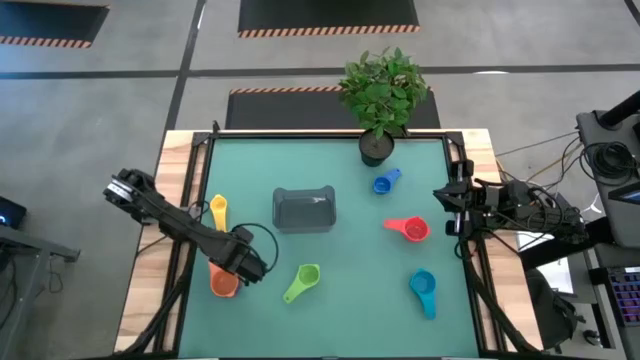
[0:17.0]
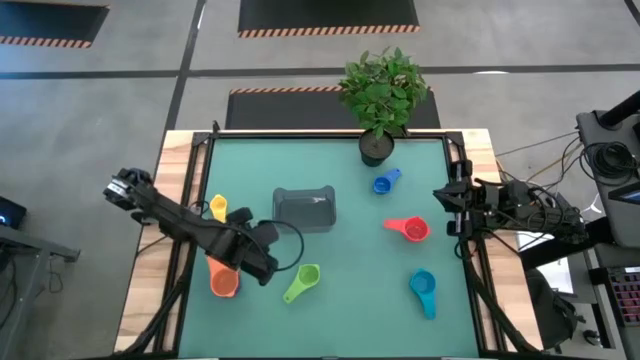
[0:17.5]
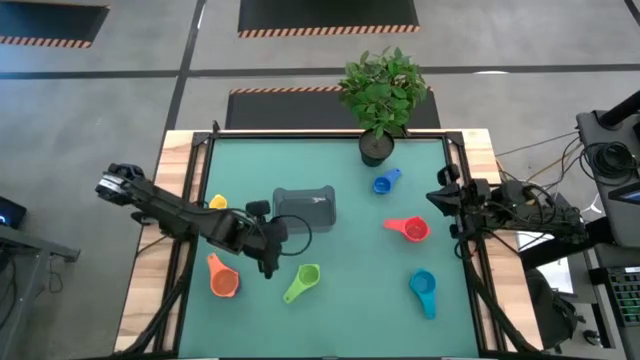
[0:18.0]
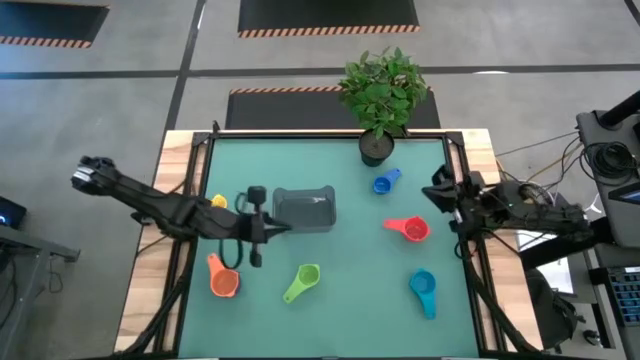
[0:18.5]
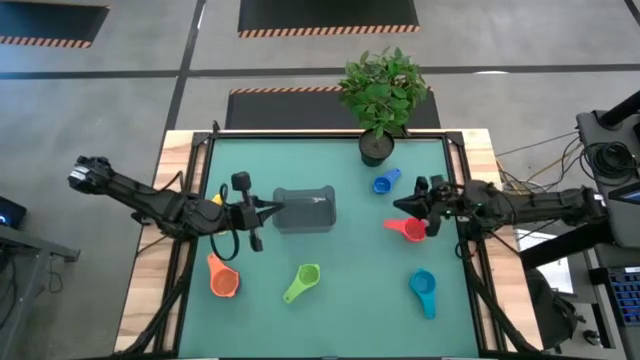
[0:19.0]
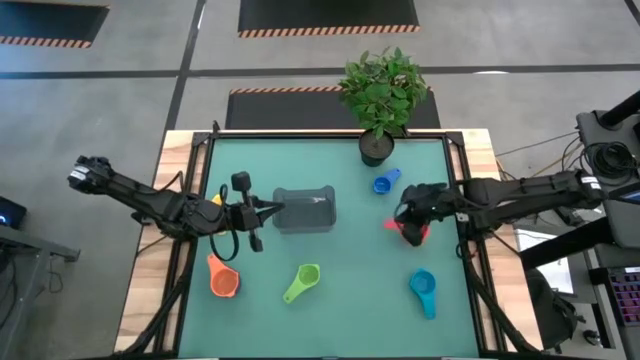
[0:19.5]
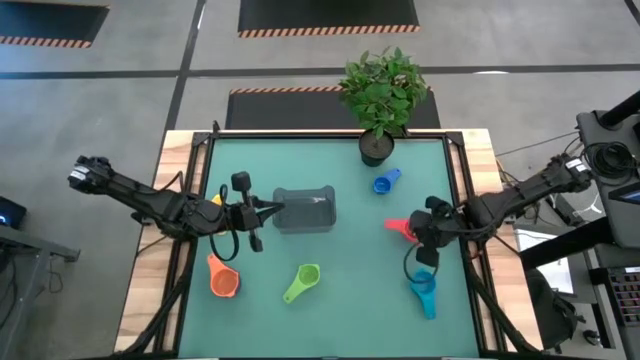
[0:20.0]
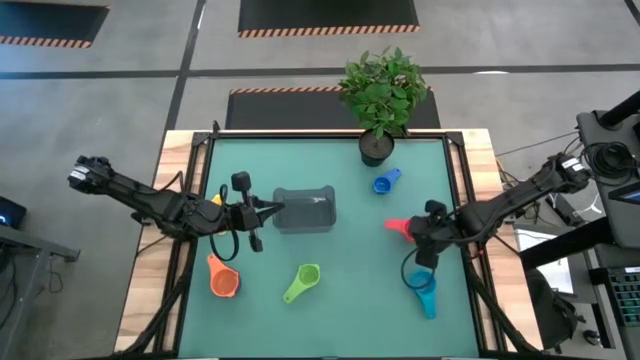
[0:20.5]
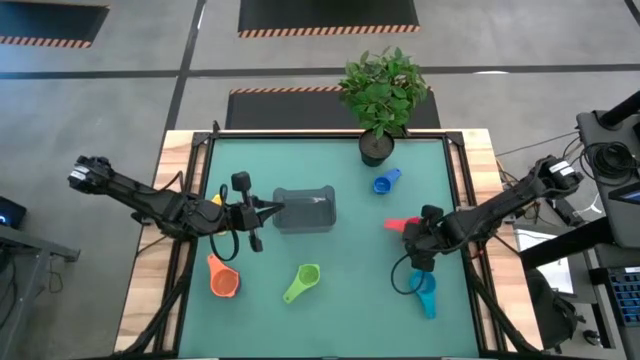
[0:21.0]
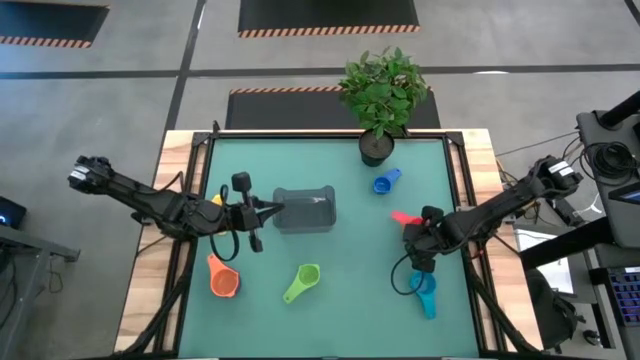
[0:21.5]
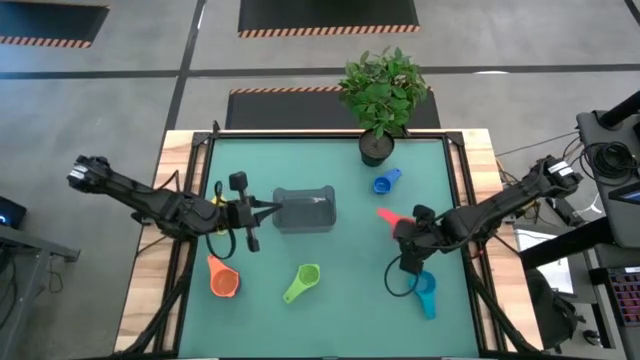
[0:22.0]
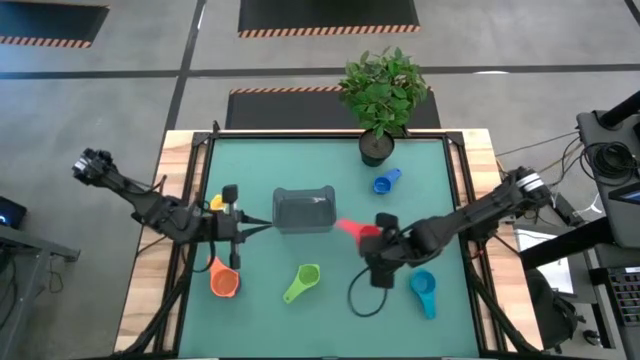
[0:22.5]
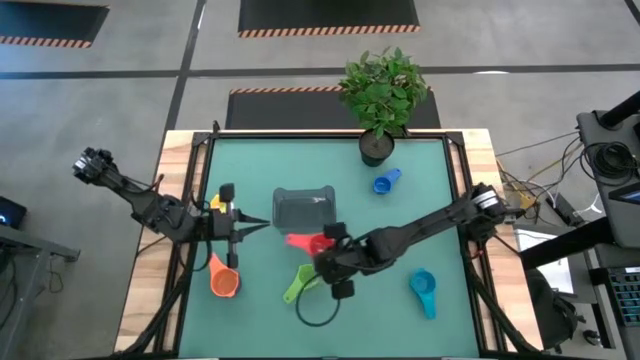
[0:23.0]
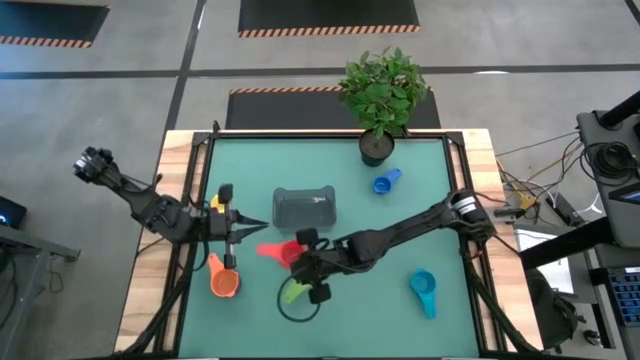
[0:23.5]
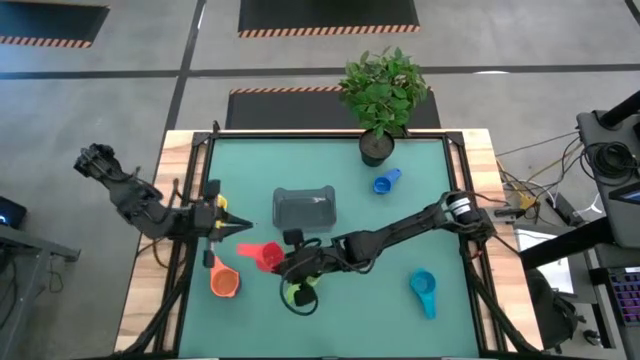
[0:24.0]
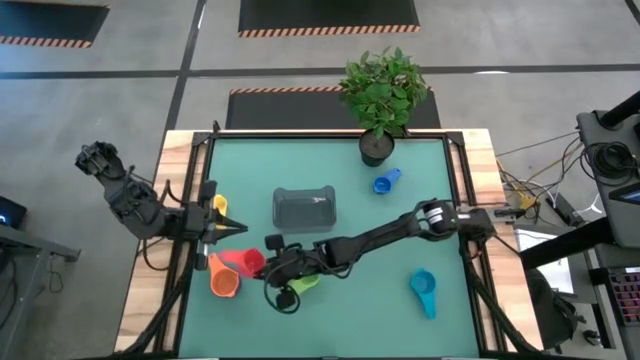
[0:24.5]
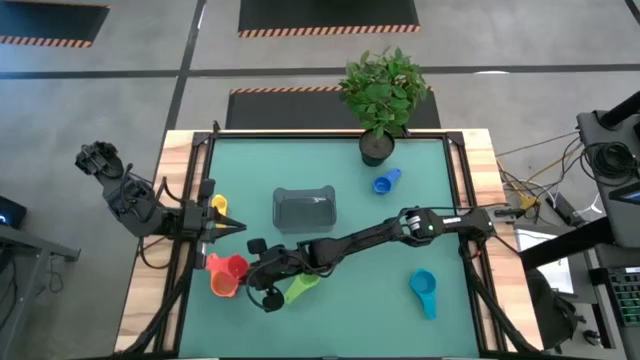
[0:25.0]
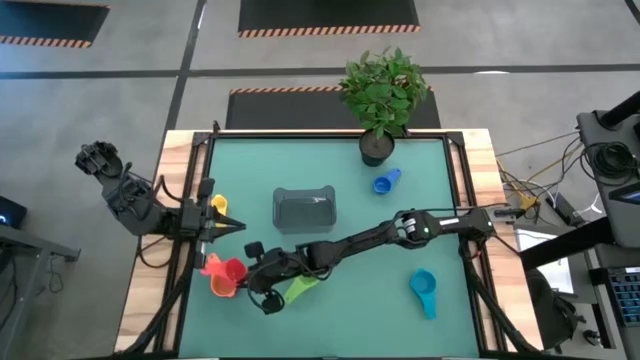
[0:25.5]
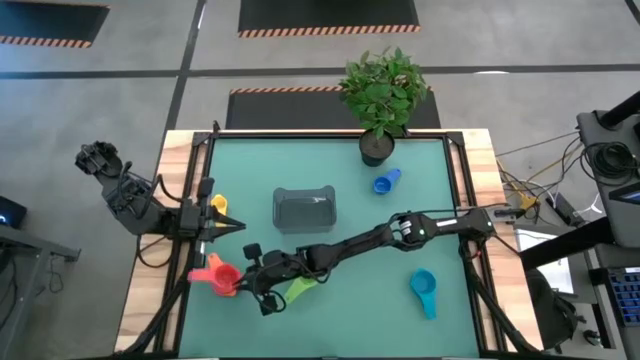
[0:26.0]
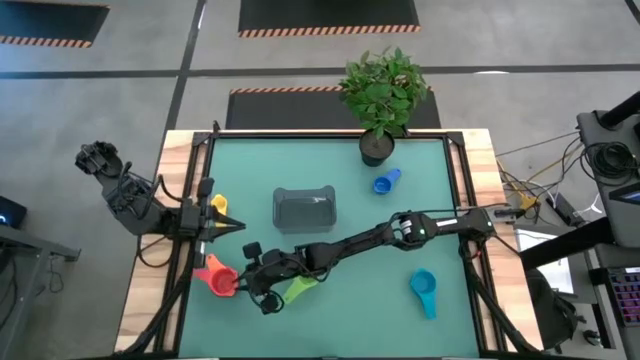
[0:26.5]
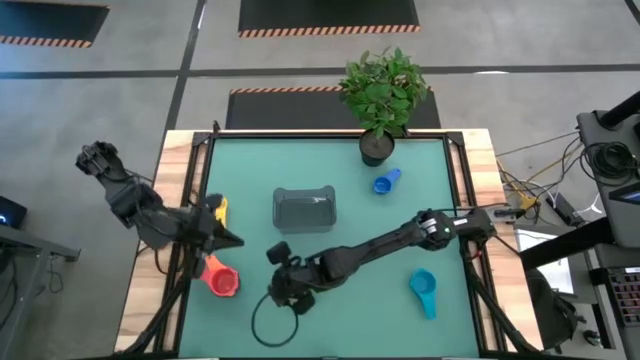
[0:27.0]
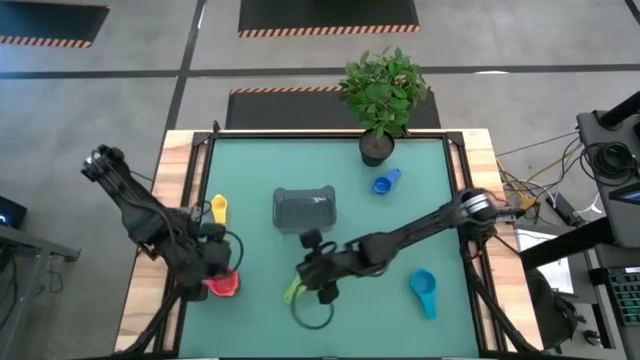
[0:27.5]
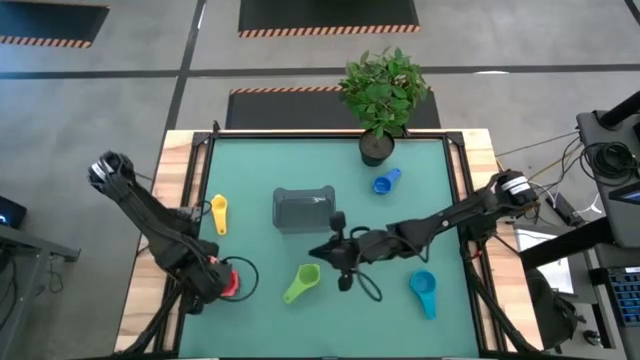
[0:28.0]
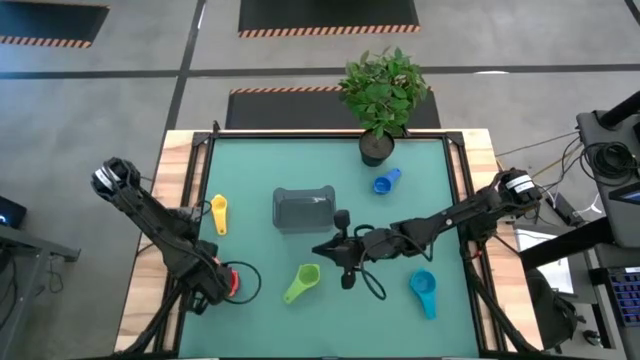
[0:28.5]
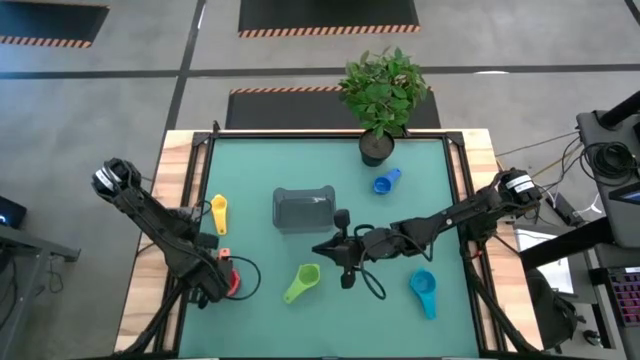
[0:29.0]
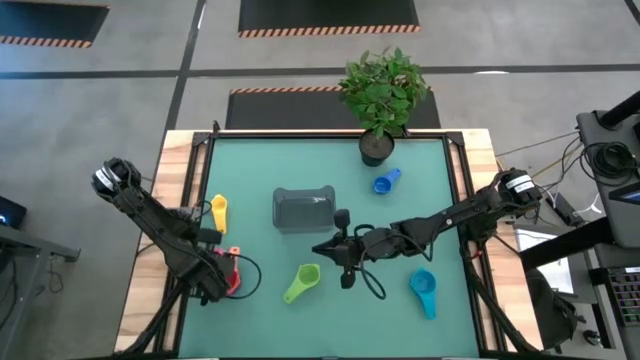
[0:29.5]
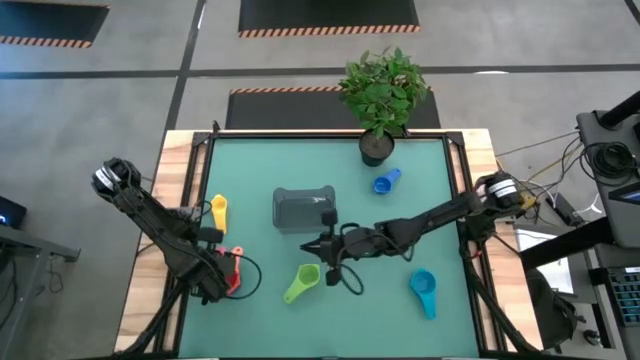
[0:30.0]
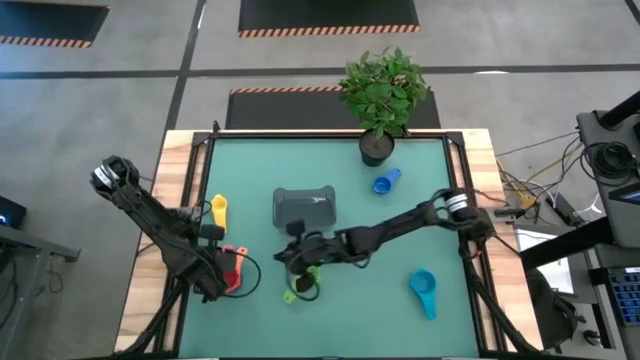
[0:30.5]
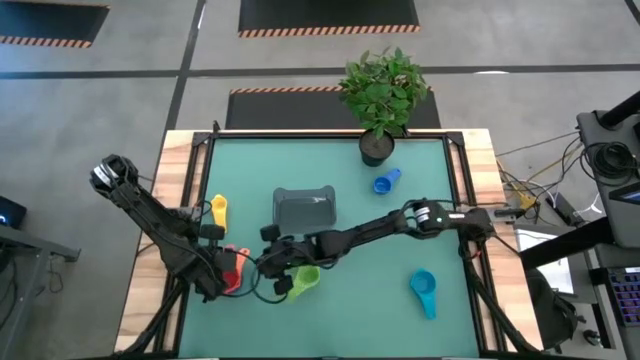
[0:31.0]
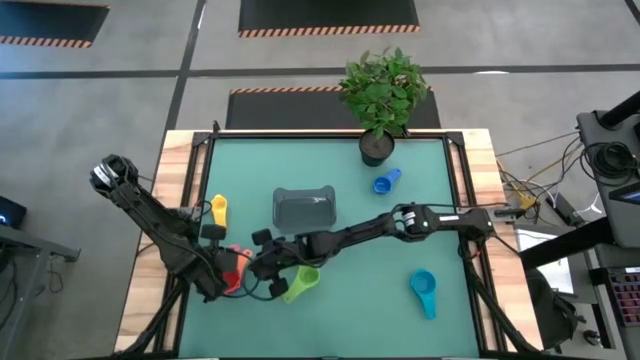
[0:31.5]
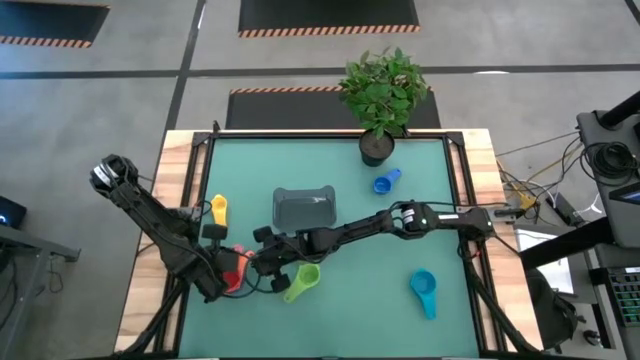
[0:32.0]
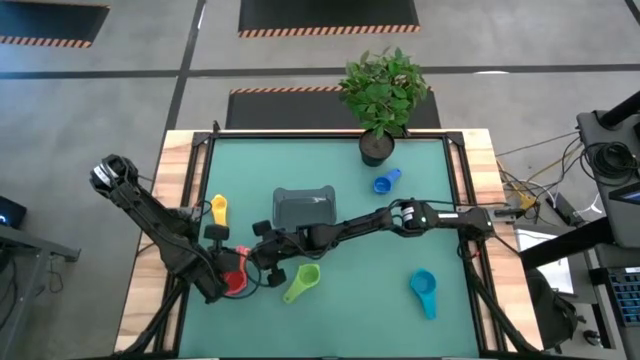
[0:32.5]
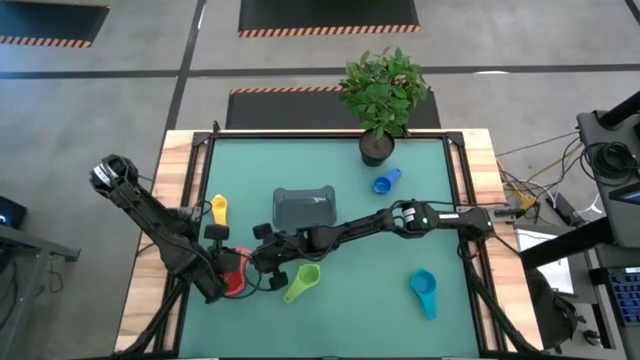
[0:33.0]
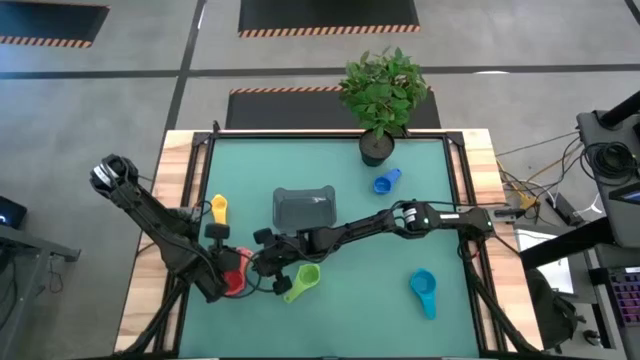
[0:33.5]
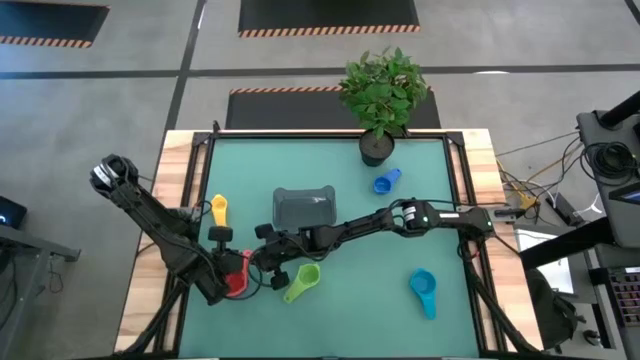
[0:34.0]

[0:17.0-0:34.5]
Task: Nest measuring cups in basket
Stack the red measuring cup on top of the orange measuring cup
